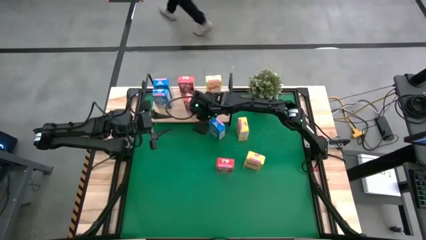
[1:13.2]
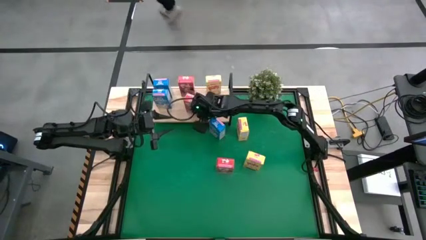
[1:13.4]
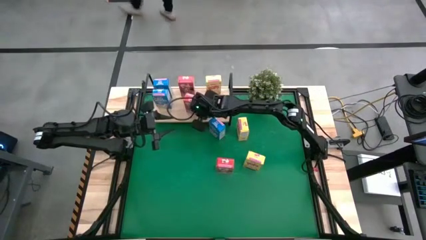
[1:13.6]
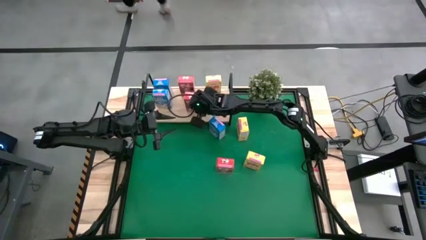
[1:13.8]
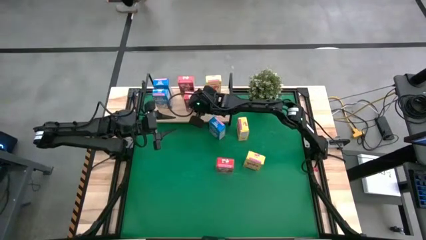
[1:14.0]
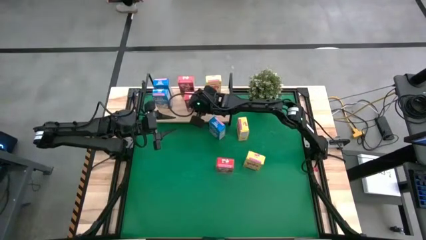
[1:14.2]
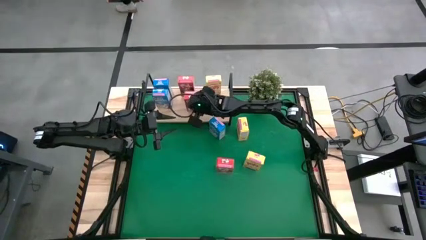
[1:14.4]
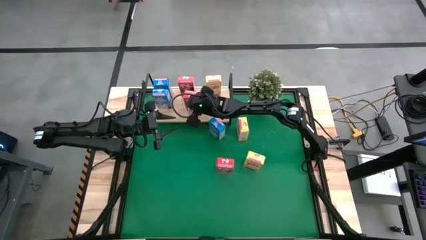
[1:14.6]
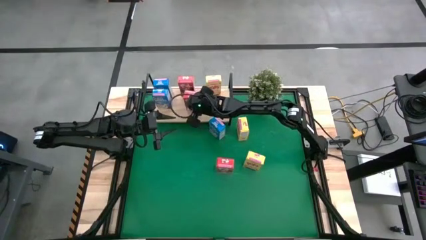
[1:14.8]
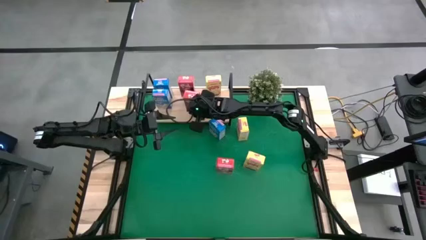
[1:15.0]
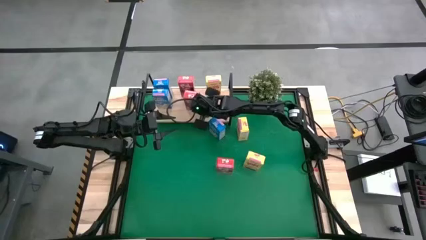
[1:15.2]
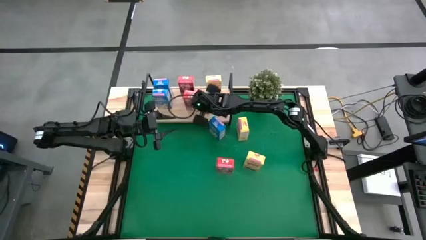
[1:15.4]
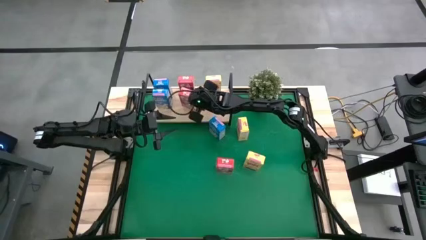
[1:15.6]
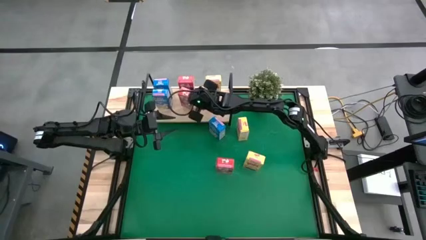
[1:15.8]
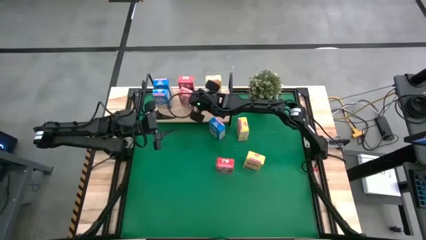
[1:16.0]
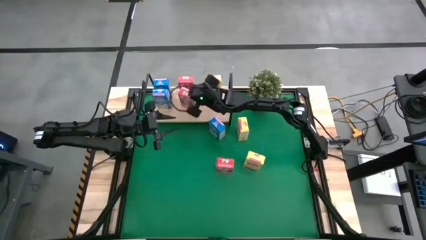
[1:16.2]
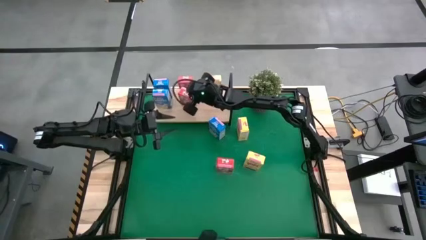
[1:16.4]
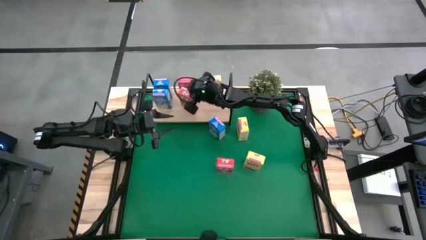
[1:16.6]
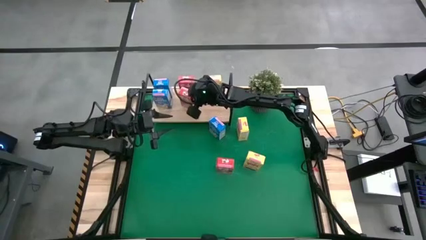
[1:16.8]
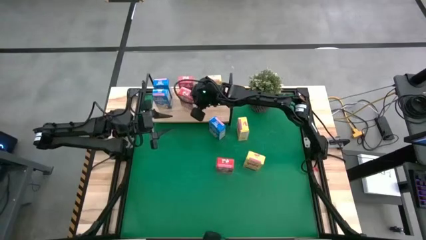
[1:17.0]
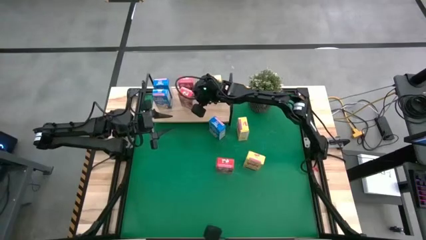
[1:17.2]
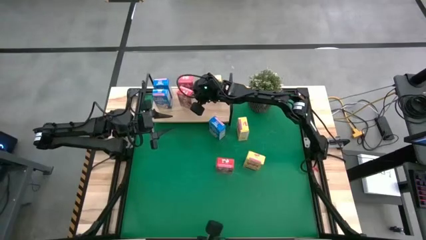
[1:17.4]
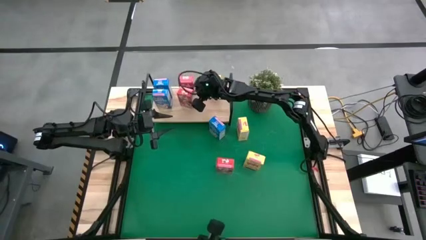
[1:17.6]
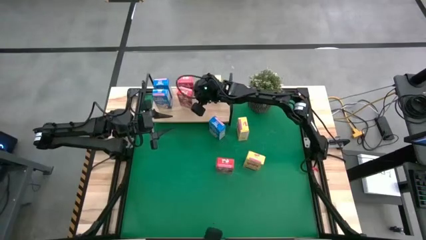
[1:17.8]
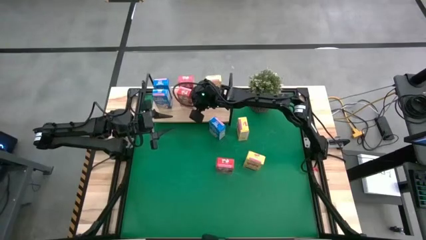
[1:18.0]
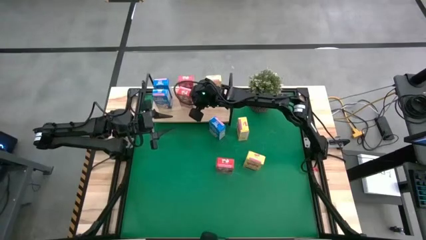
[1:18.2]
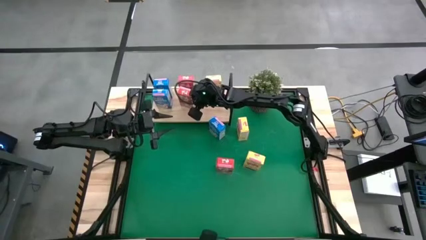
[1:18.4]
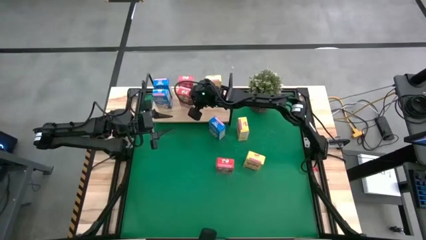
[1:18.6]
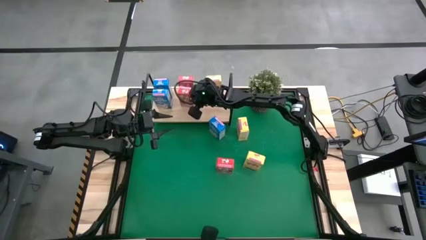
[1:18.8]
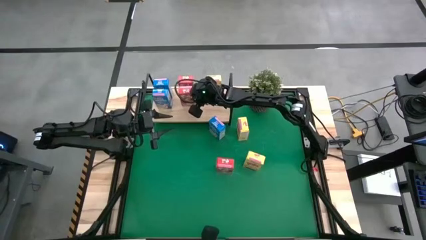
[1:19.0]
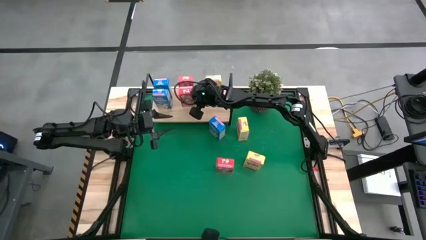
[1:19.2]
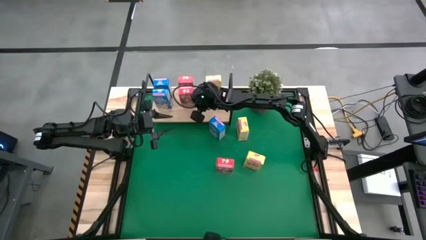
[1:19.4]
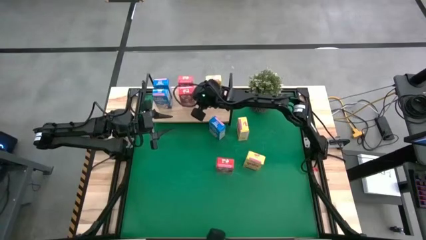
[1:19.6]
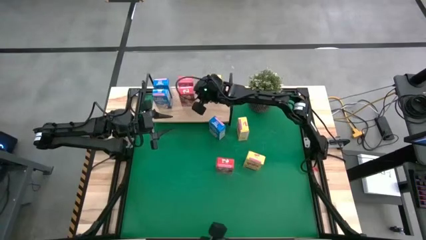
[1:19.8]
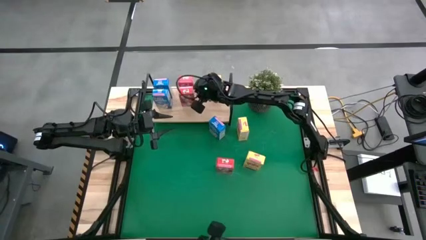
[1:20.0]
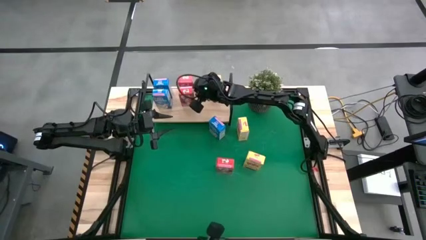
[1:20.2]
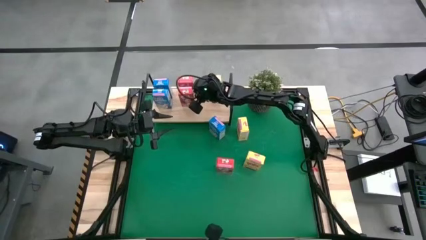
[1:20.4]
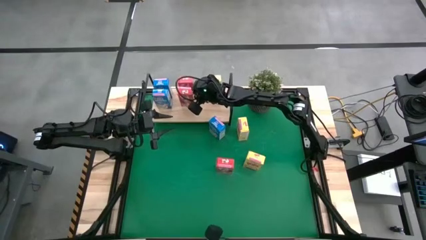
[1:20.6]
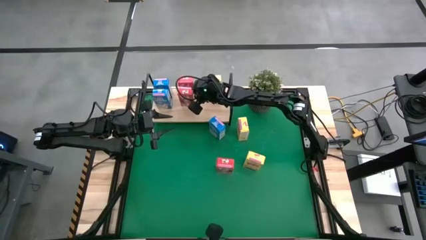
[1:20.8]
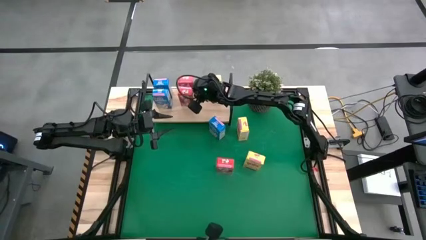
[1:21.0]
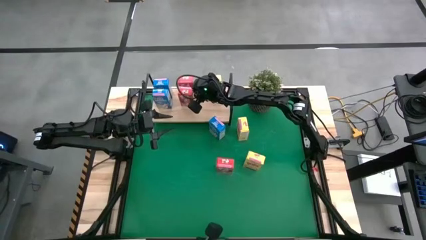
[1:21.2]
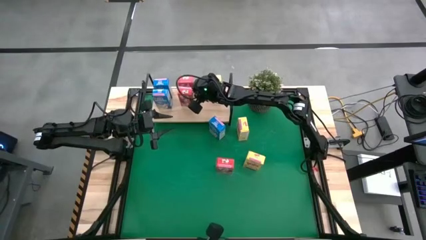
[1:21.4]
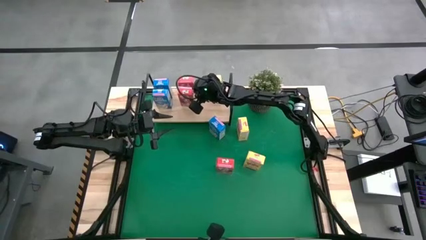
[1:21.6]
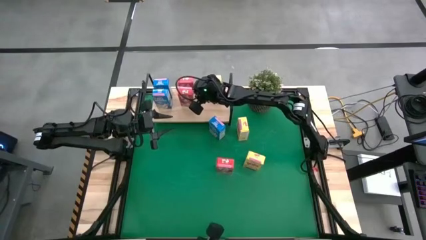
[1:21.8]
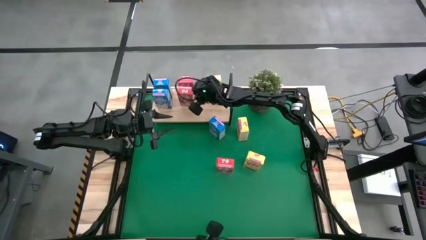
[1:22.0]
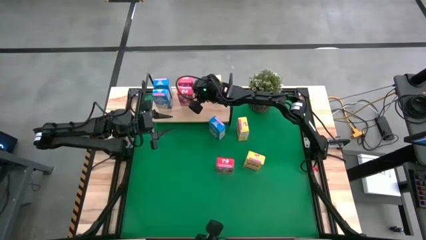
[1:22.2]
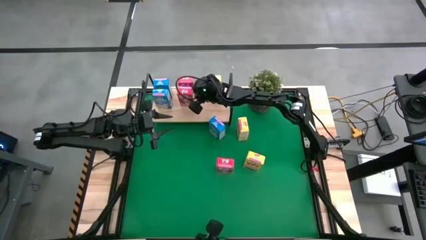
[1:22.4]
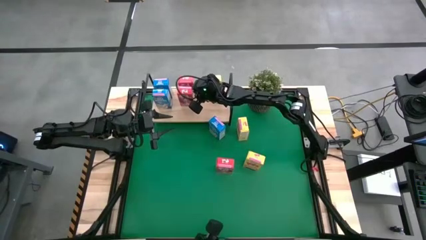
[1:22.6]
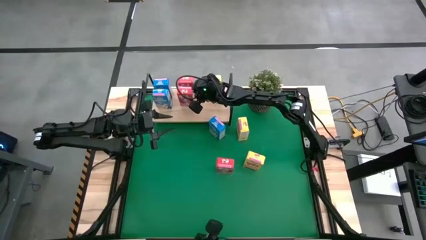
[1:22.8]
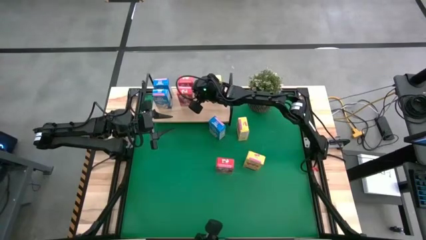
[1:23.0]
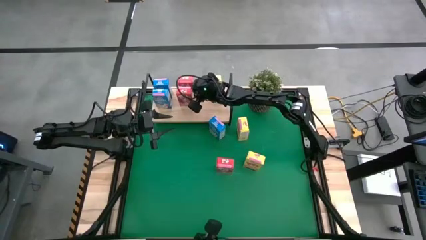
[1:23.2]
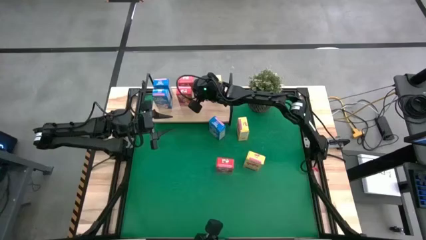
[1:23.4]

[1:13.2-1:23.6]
Task: Stack cereal on shelf
Put the top red cereal box aligned with the other red cereal box on the shelf

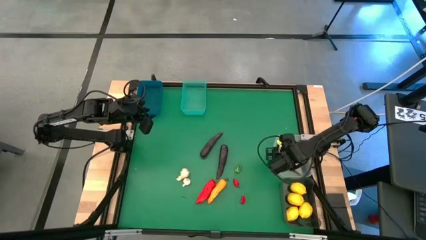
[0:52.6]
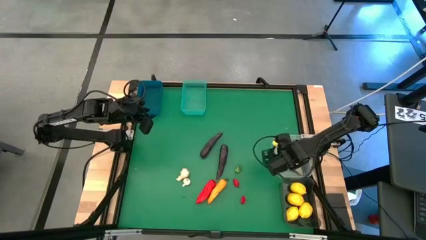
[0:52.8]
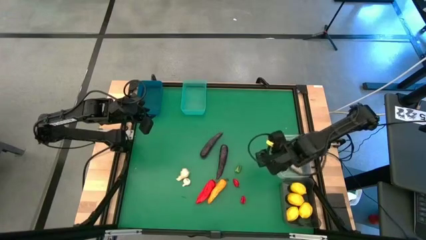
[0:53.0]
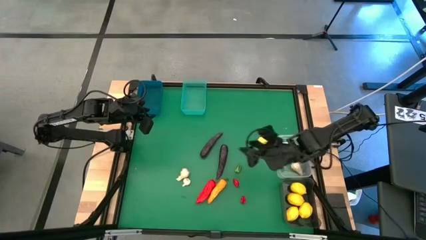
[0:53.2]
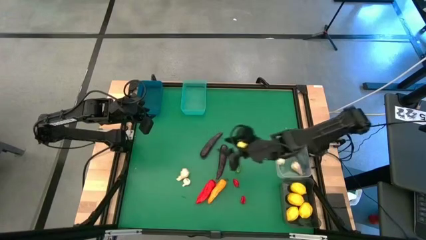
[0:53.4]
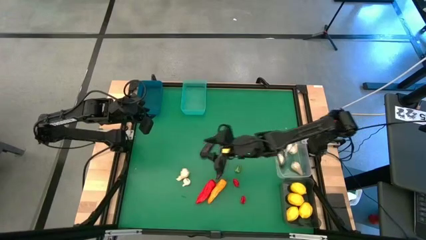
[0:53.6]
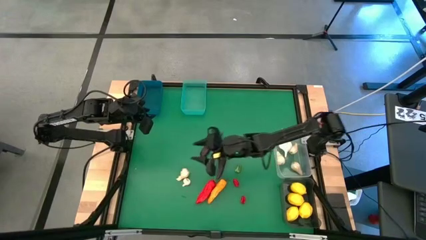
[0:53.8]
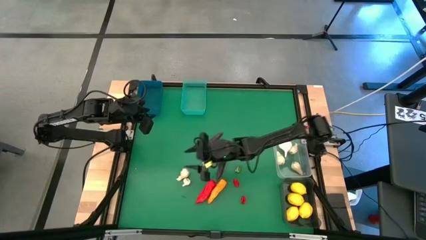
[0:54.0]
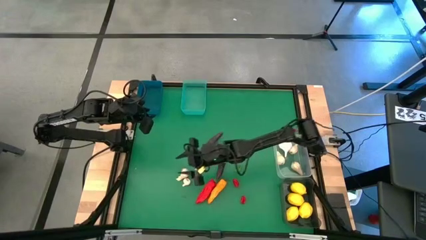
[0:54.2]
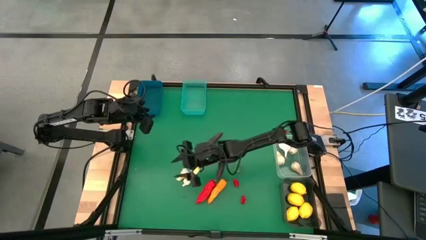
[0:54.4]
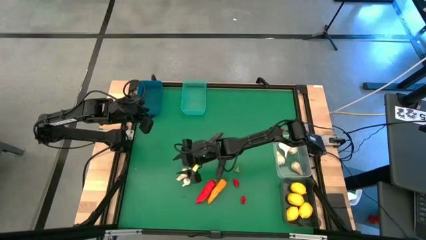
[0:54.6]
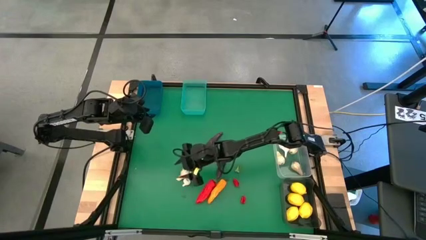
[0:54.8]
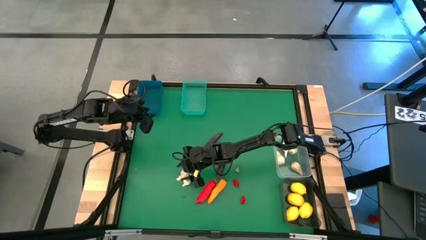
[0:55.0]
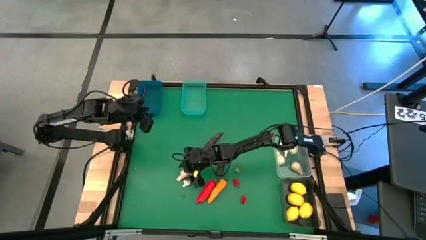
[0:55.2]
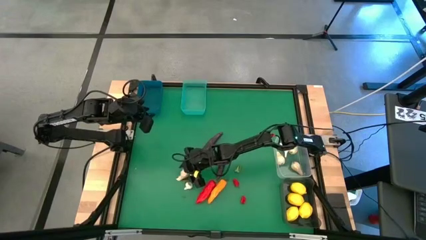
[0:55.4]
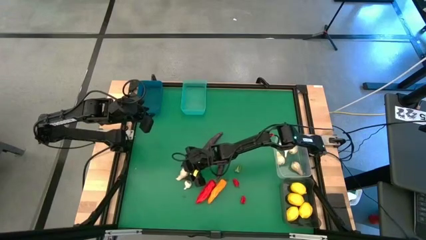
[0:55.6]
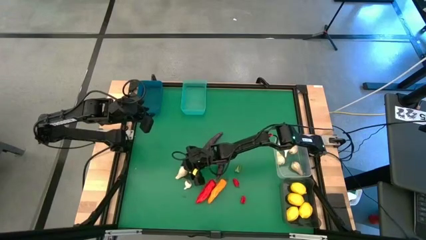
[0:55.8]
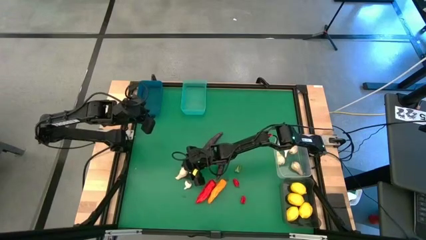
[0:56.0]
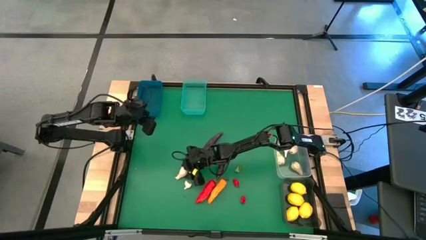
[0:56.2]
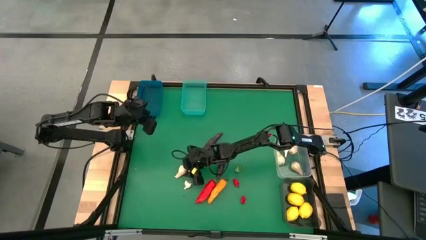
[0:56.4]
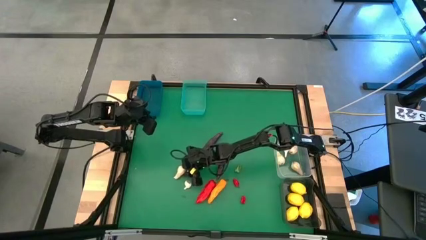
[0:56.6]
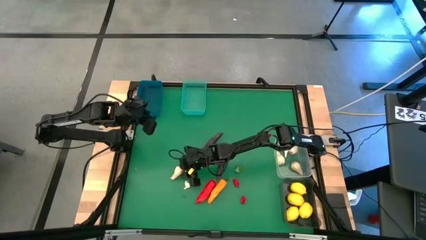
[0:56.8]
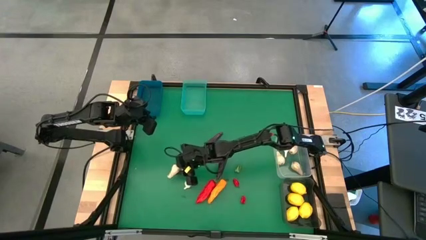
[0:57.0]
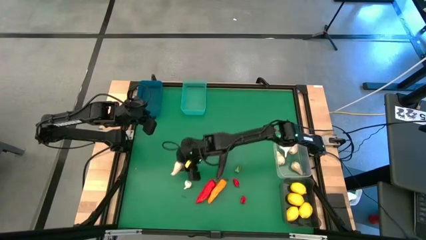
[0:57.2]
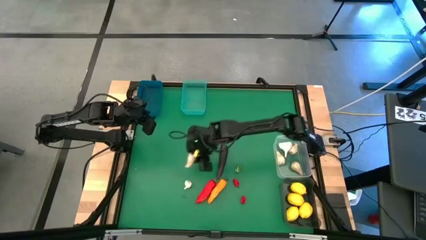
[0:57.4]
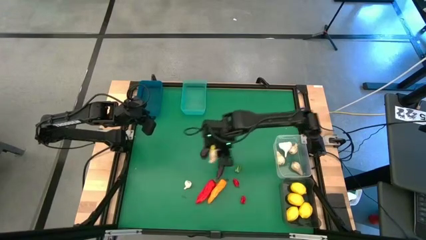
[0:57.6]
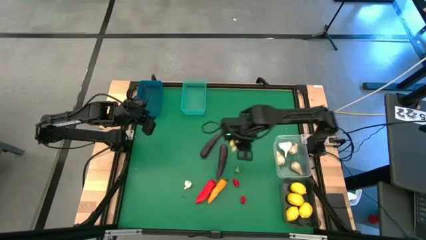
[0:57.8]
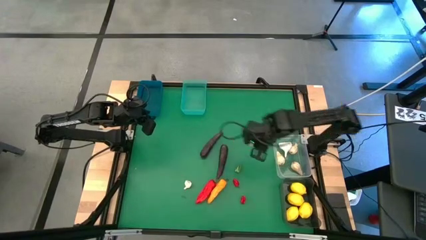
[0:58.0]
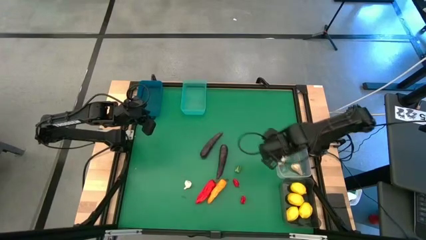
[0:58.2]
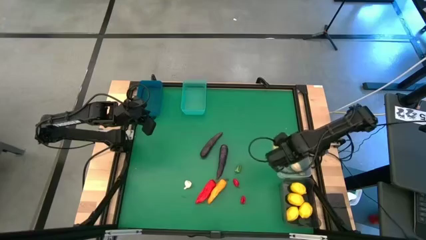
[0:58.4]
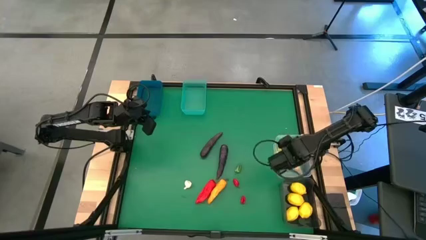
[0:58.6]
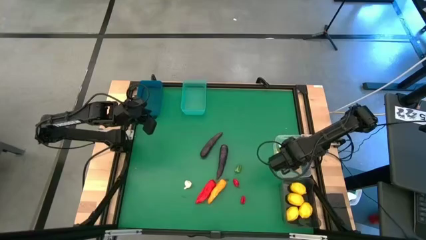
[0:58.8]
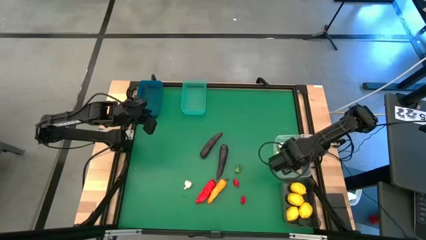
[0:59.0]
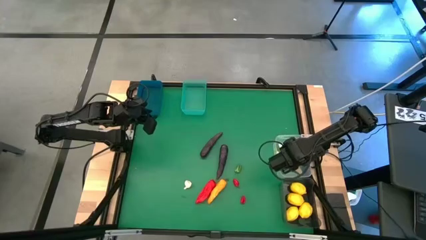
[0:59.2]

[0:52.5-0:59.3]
Task: Sort produce into baskets
Put the white garlic into the transparent bin
